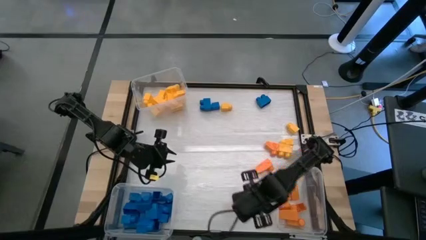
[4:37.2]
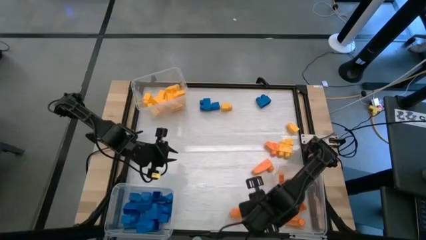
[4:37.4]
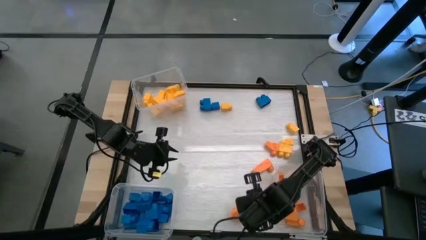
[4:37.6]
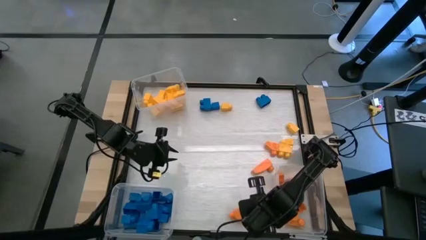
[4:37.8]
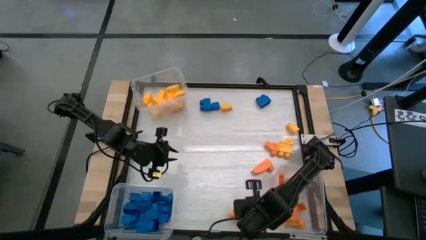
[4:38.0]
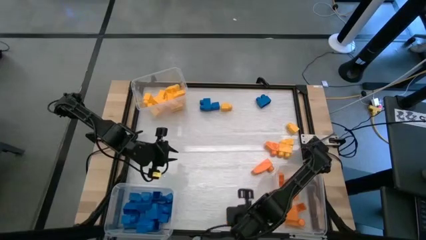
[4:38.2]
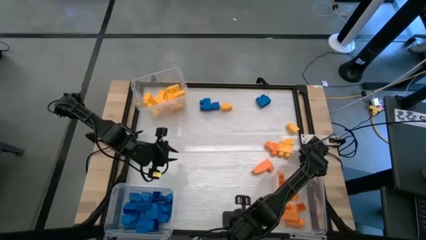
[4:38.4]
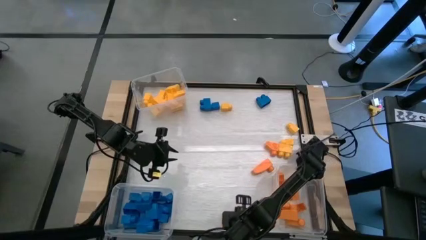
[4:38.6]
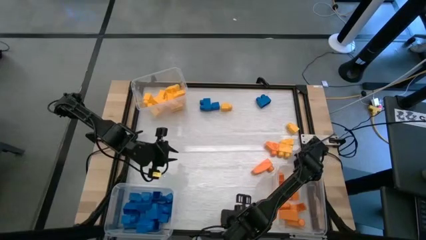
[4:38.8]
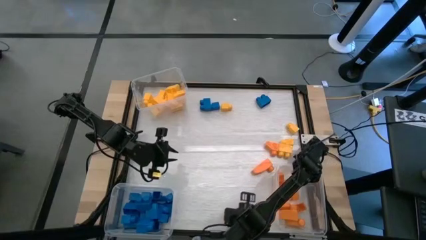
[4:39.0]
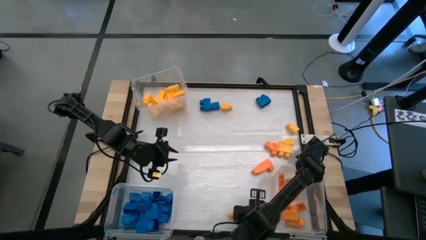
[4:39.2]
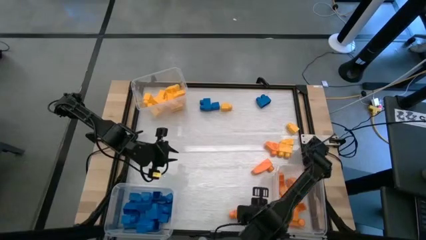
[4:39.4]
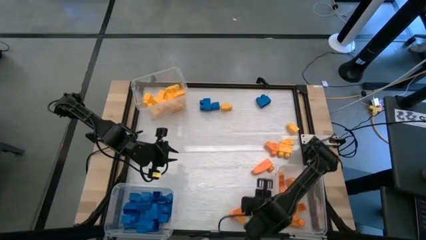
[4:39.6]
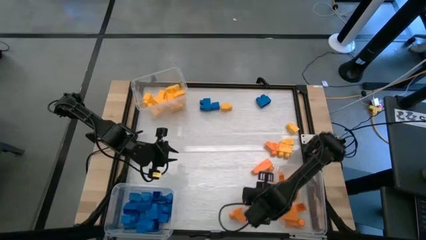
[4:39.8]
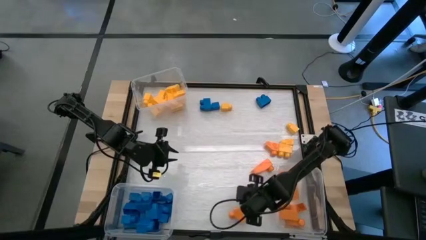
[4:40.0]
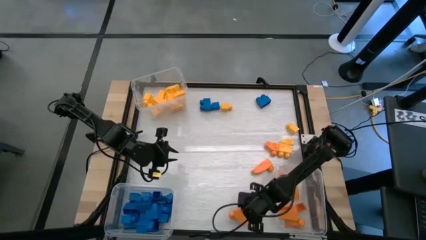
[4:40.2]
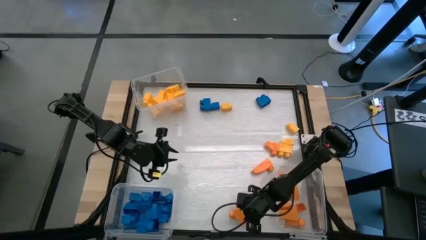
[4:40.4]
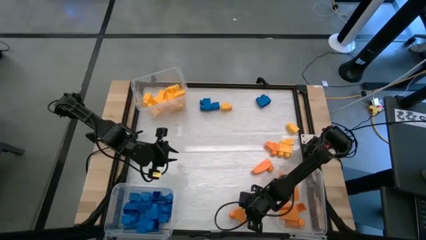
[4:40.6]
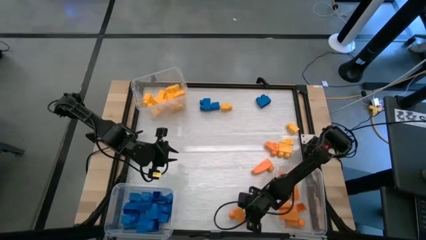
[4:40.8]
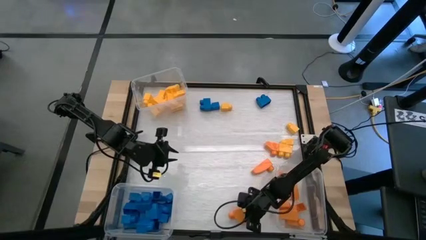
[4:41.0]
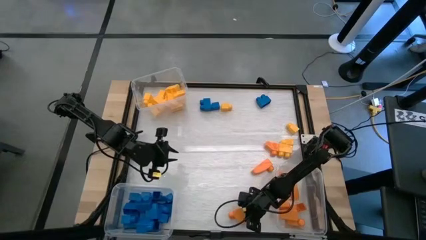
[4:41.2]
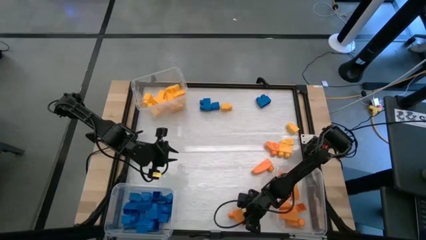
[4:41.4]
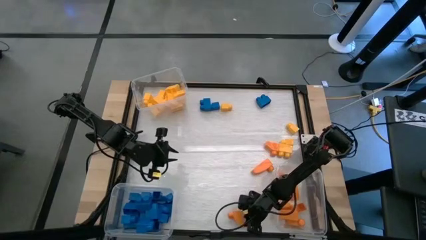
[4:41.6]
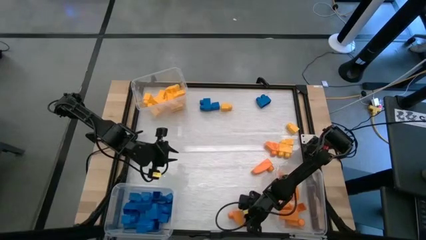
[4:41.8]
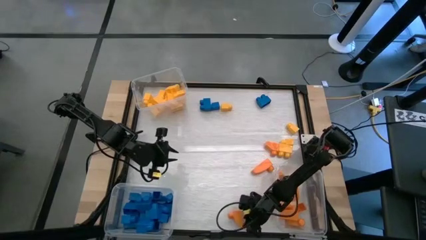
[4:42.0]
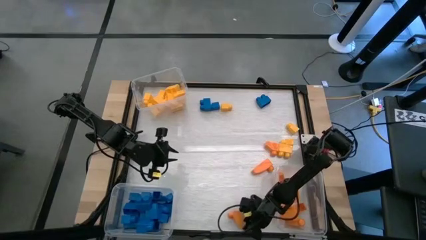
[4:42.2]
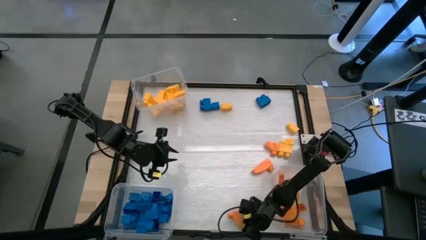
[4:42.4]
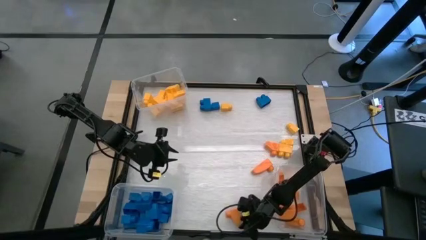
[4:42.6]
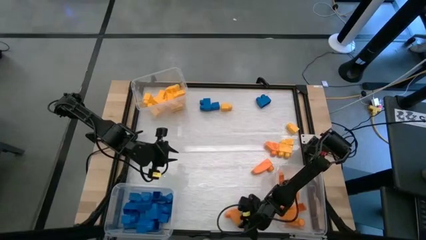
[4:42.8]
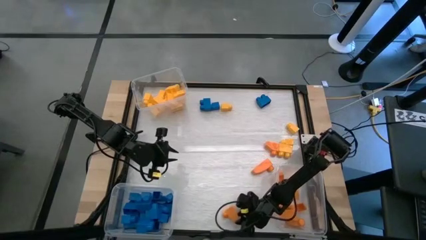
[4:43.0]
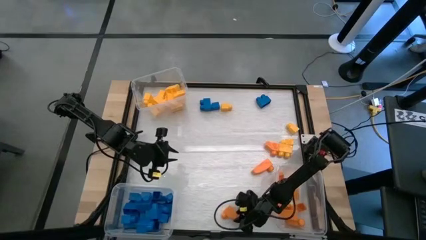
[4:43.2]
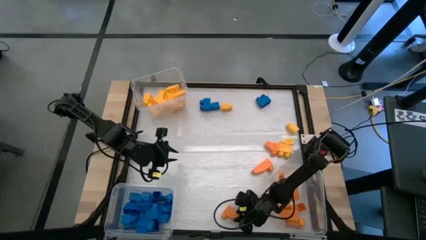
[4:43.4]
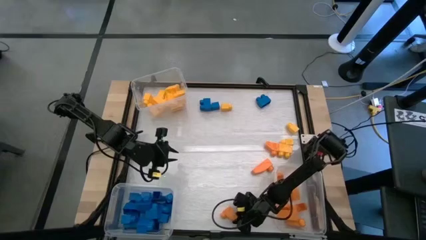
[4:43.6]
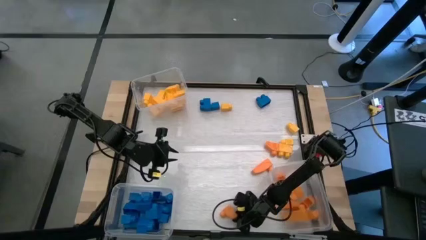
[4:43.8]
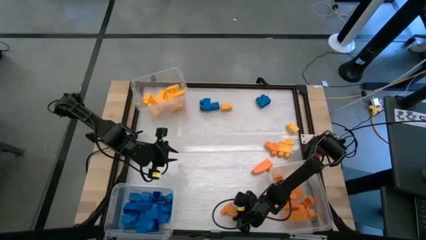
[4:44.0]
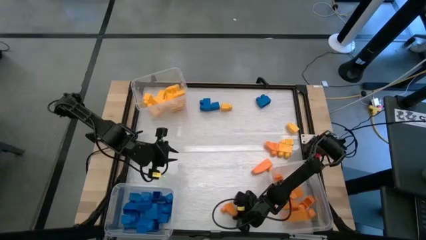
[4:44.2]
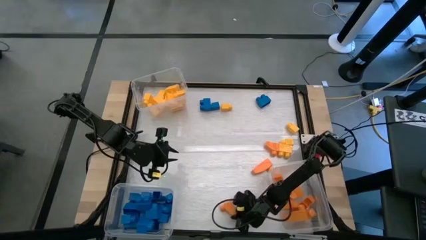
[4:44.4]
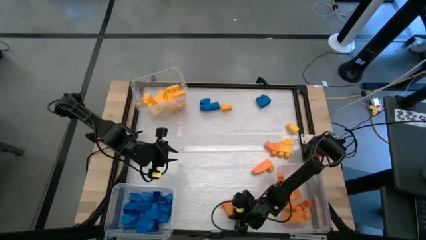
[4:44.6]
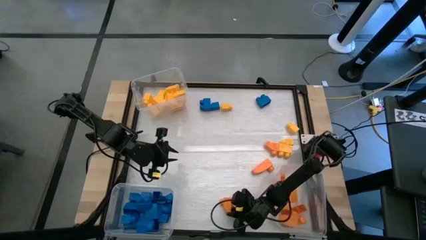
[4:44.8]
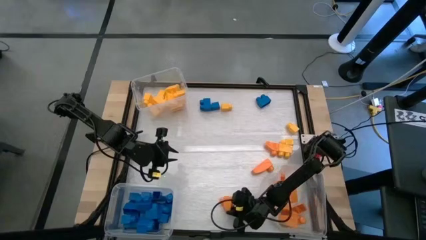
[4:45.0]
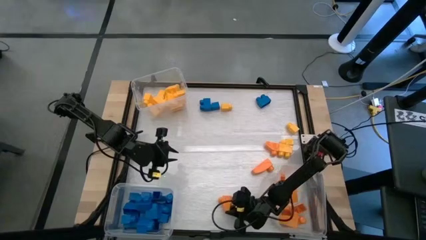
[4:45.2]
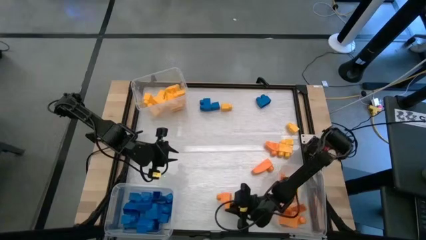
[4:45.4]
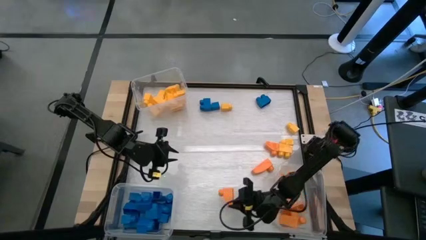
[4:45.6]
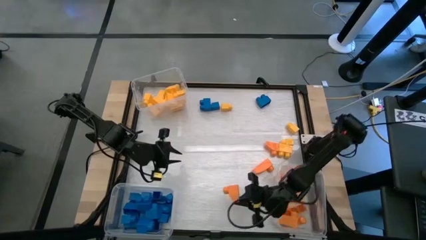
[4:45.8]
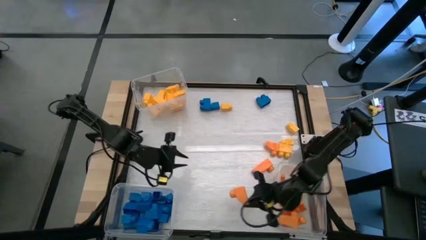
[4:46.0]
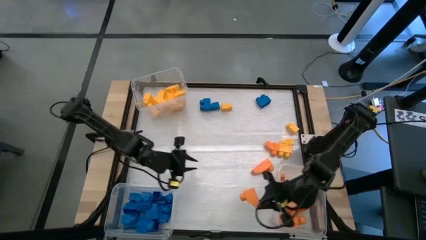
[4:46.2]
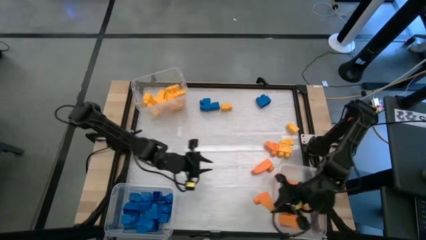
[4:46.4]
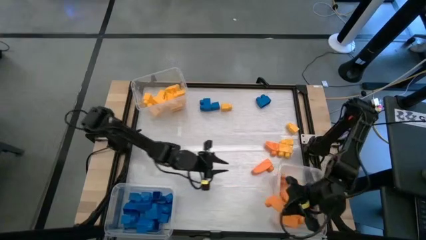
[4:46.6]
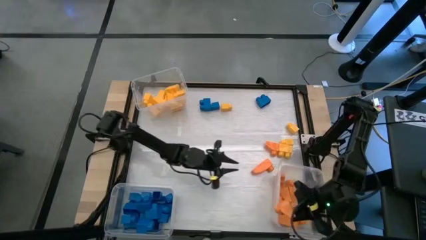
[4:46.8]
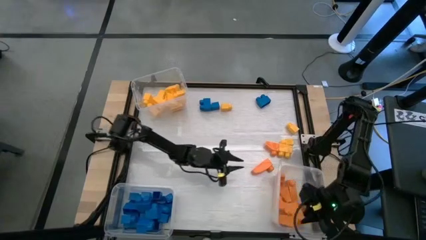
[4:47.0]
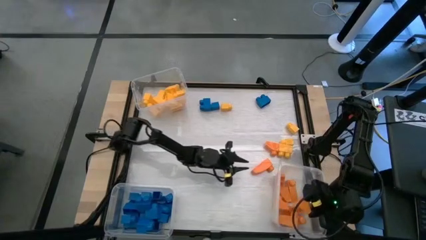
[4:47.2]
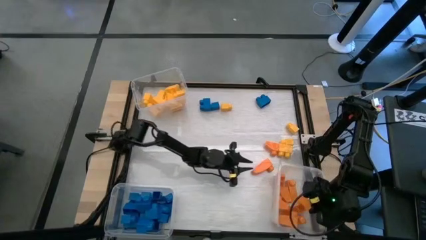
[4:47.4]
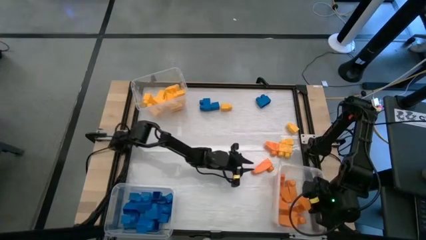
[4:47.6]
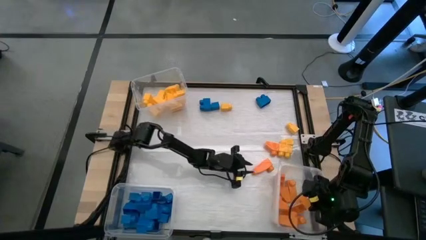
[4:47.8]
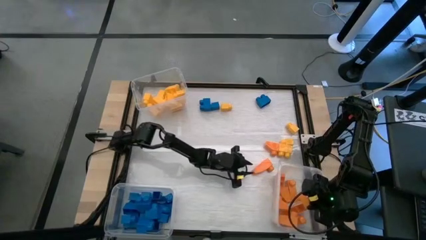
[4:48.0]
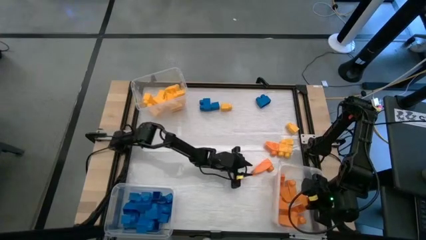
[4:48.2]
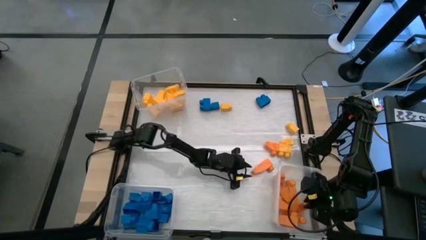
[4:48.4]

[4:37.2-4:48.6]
Task: Sort blocks
Put the orange game piece into the bottom right transparent bin

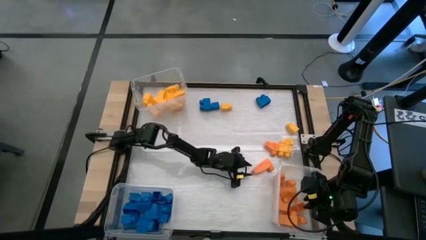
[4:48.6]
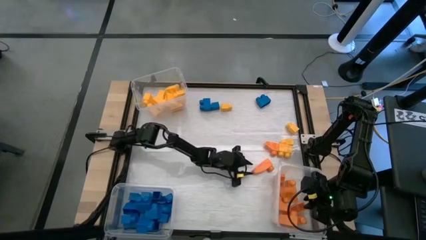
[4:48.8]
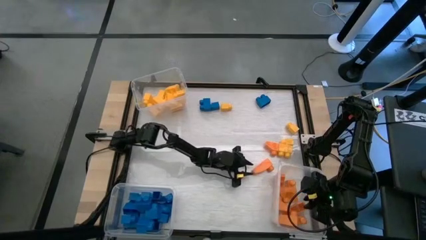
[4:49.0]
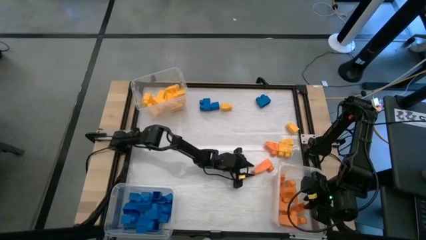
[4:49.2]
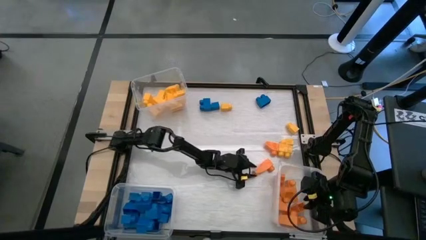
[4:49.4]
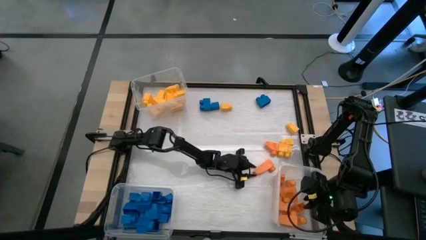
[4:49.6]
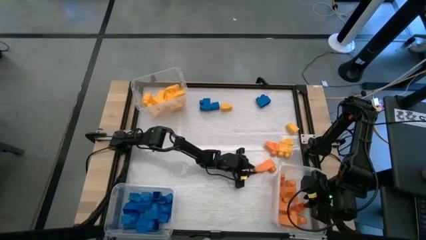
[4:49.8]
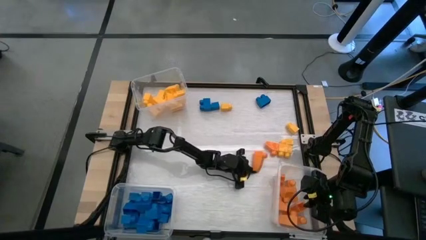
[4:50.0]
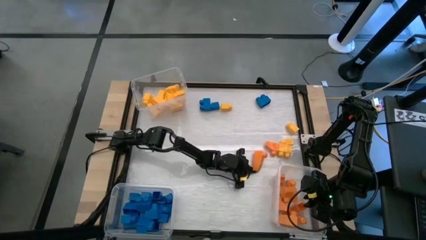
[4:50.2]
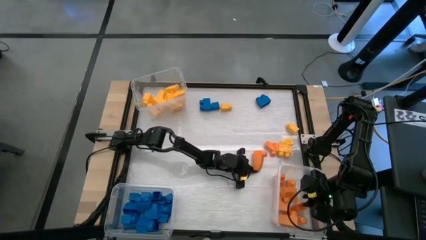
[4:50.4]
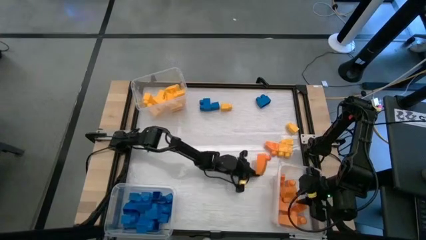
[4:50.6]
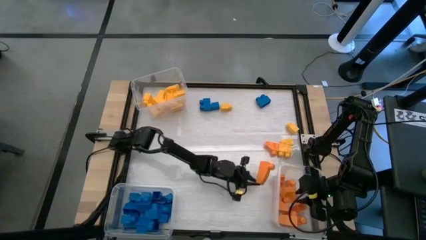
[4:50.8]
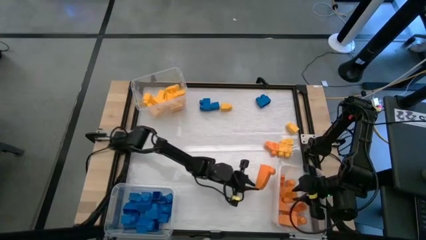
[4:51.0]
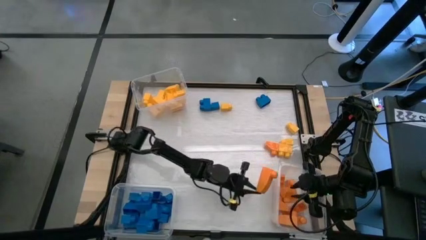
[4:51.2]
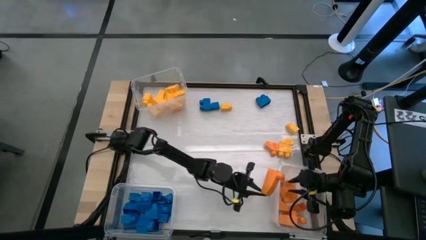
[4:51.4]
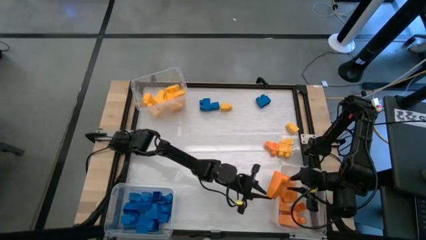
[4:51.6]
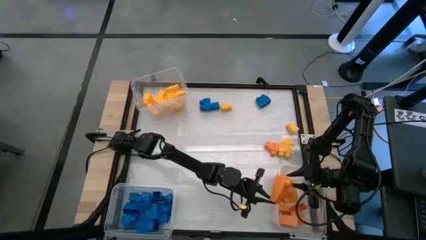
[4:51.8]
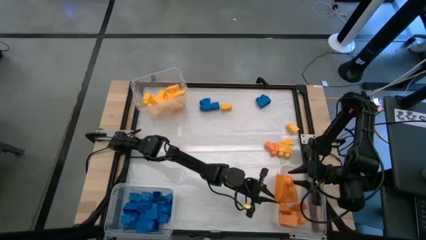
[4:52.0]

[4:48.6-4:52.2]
Put the orange game piece into the bottom right transparent bin

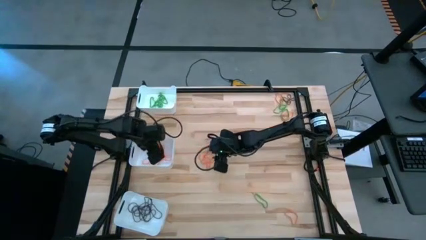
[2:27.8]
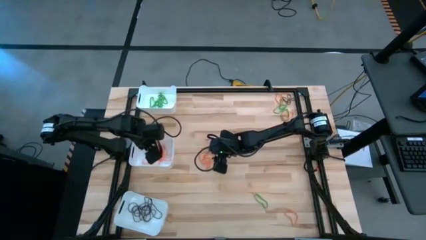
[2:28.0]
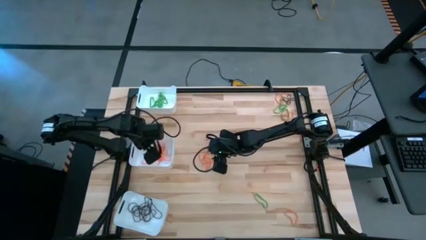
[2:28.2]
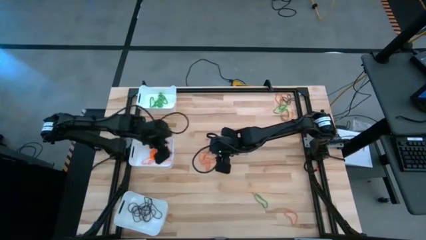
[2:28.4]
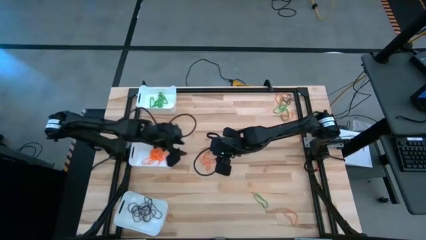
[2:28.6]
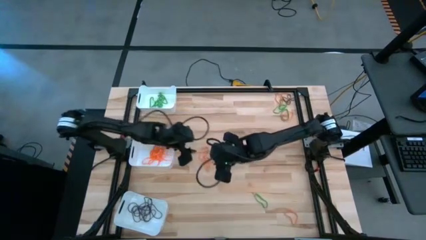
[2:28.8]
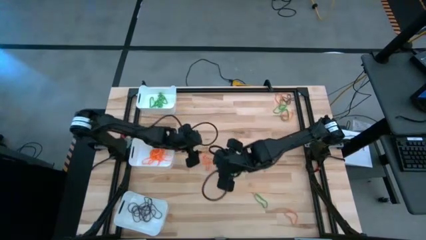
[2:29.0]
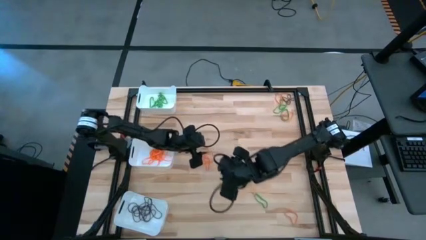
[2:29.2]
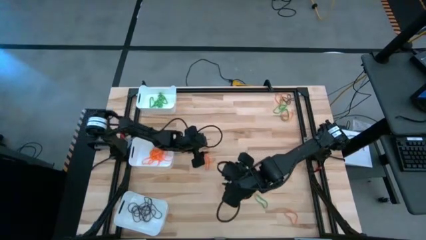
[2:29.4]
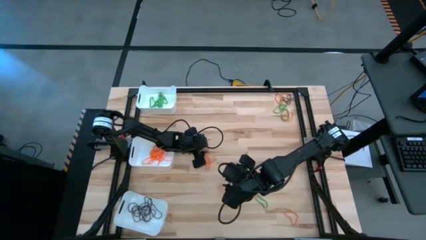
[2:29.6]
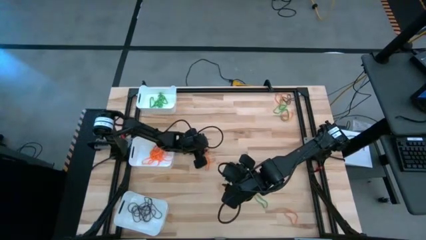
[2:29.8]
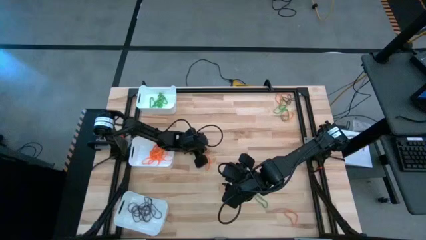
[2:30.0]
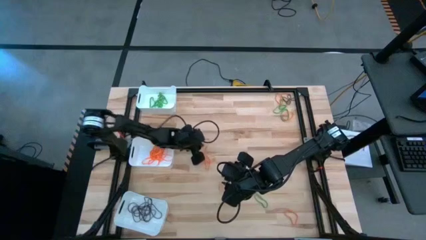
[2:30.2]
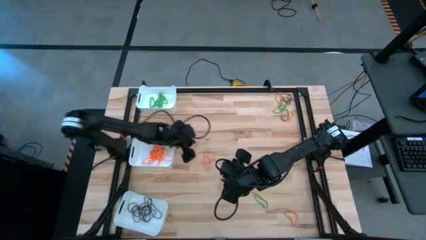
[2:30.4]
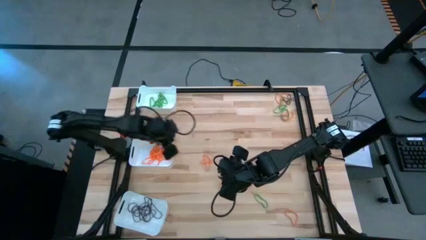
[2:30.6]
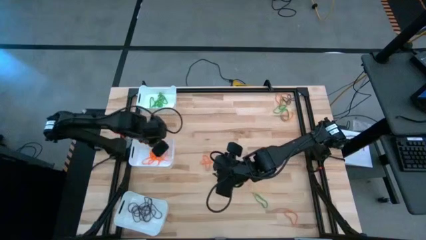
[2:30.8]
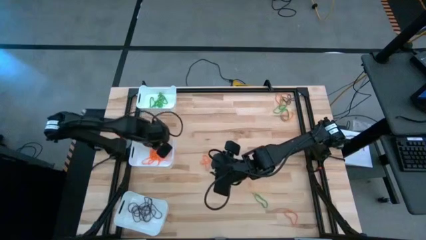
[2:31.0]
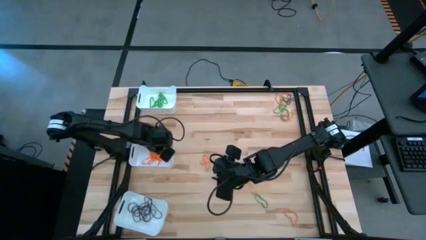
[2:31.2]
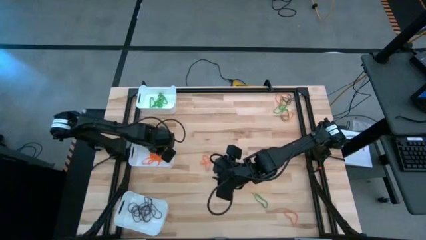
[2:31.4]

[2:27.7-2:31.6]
Task: Sort rubber bands into baskets
Put the orange rubber band into the middle white bin
